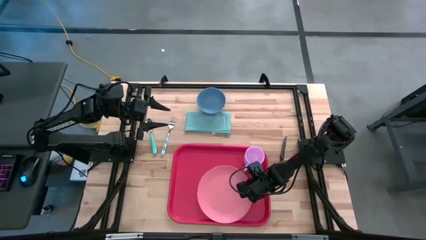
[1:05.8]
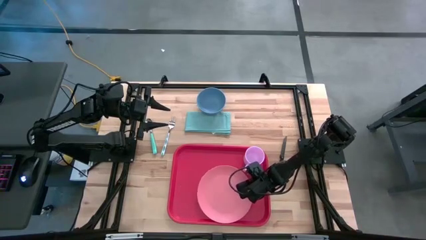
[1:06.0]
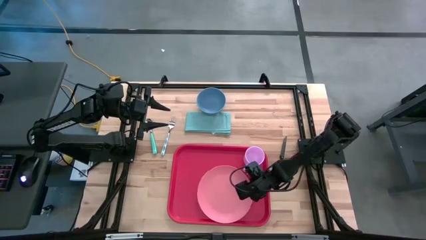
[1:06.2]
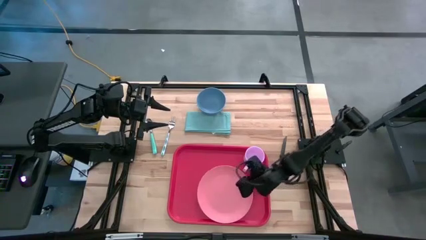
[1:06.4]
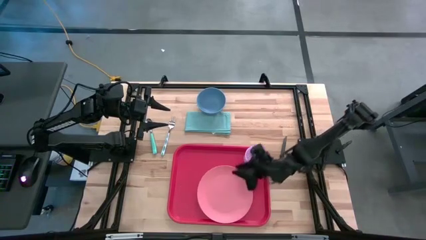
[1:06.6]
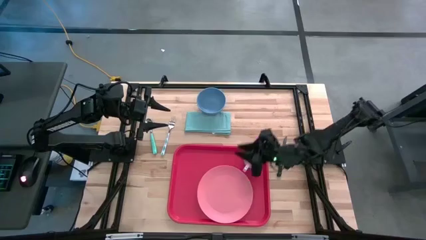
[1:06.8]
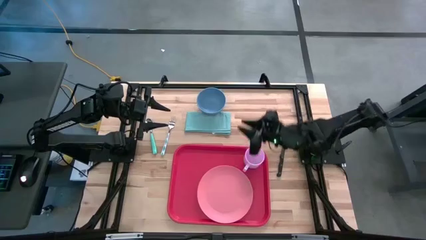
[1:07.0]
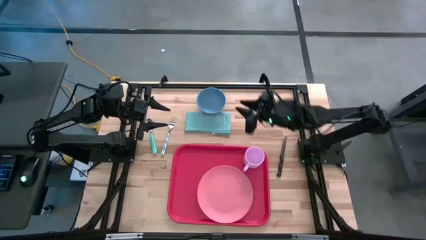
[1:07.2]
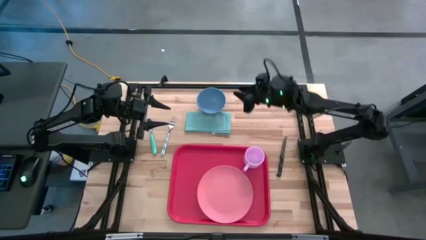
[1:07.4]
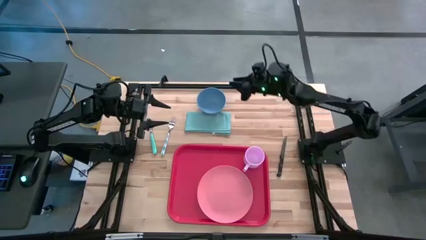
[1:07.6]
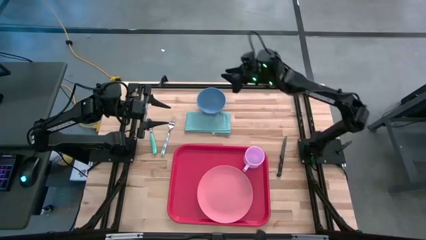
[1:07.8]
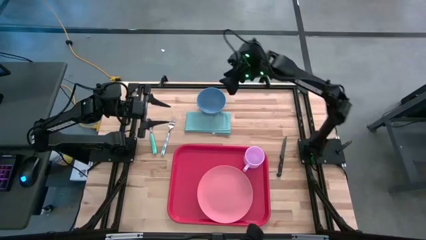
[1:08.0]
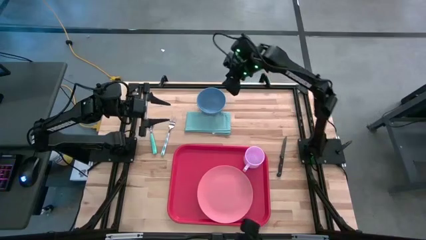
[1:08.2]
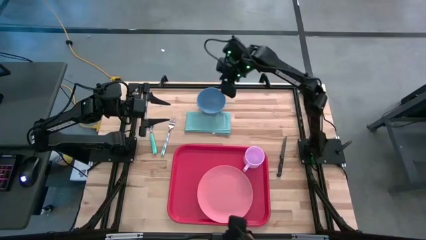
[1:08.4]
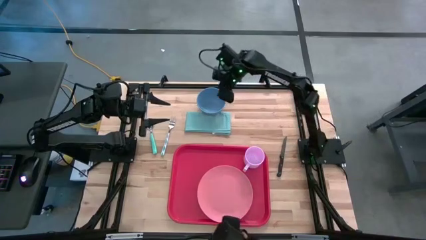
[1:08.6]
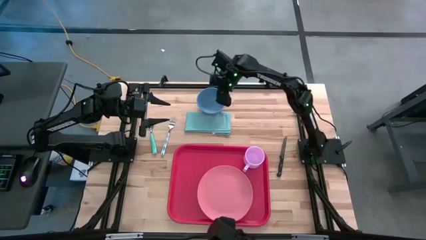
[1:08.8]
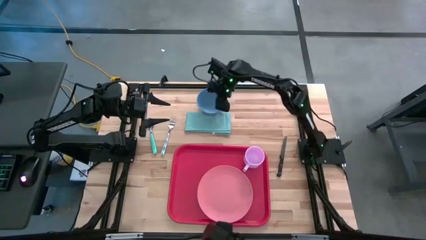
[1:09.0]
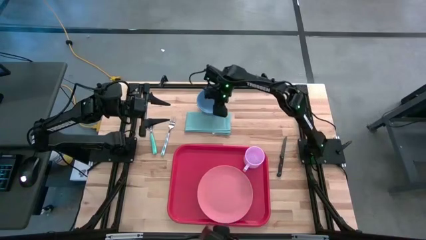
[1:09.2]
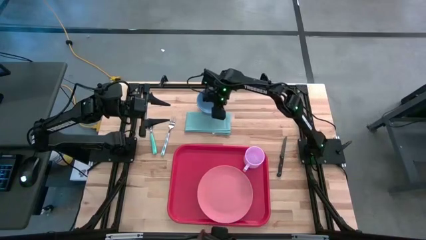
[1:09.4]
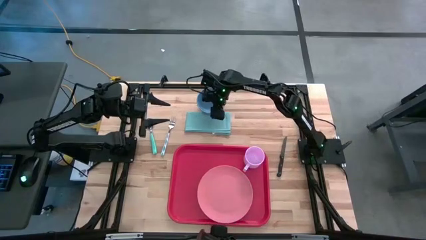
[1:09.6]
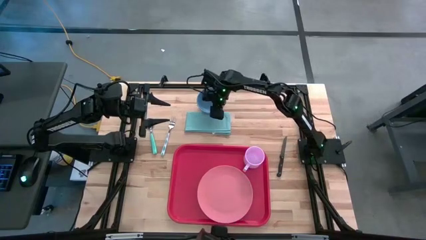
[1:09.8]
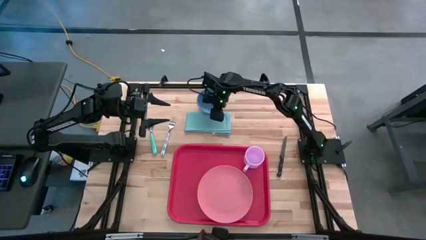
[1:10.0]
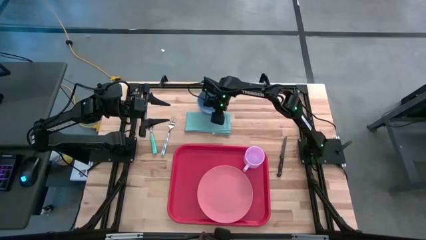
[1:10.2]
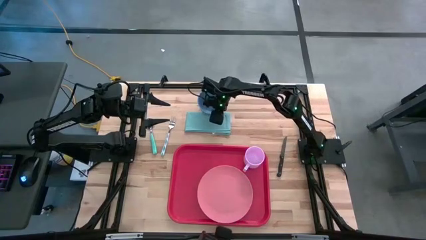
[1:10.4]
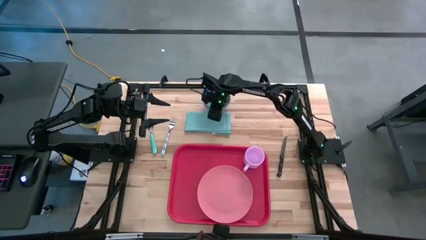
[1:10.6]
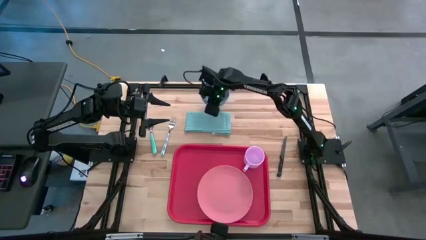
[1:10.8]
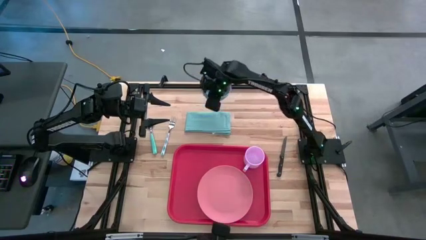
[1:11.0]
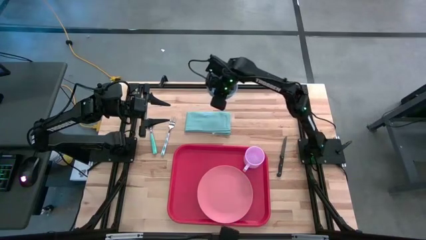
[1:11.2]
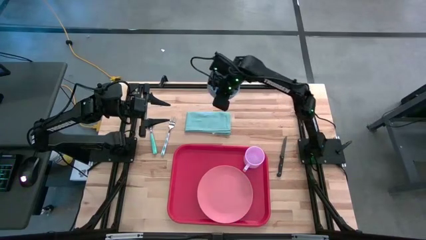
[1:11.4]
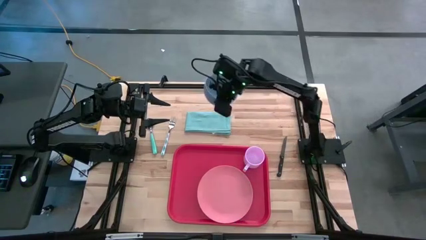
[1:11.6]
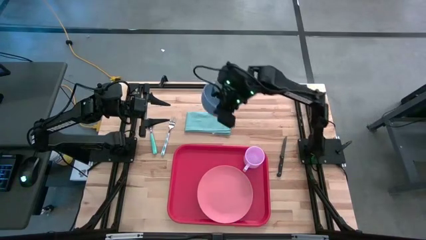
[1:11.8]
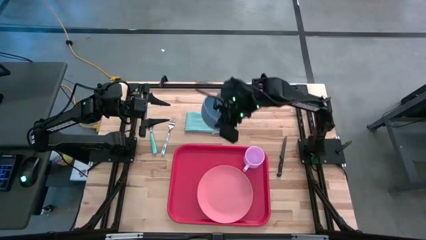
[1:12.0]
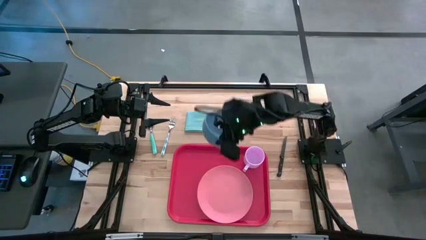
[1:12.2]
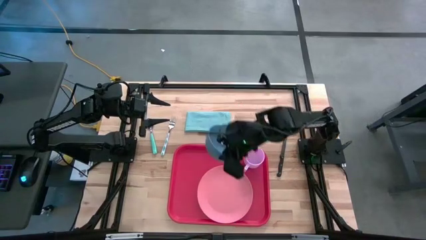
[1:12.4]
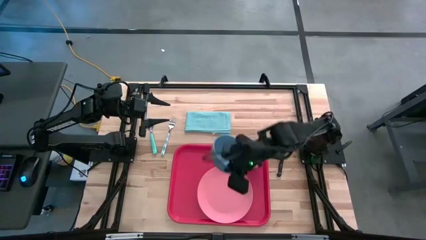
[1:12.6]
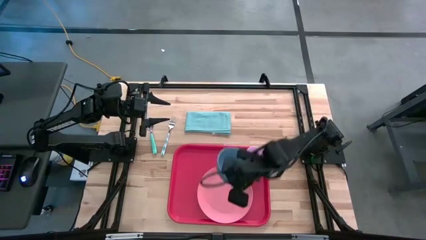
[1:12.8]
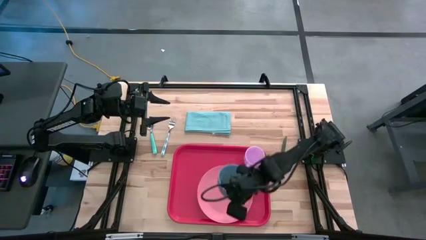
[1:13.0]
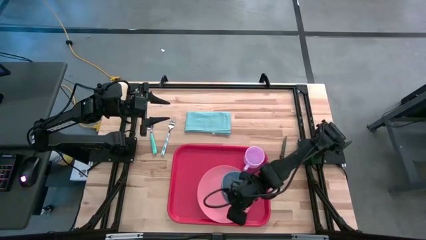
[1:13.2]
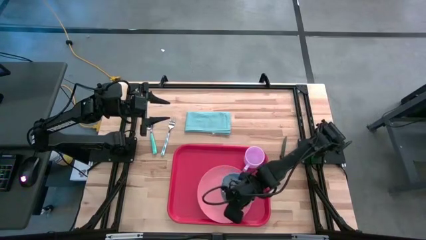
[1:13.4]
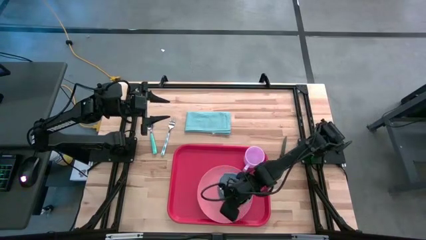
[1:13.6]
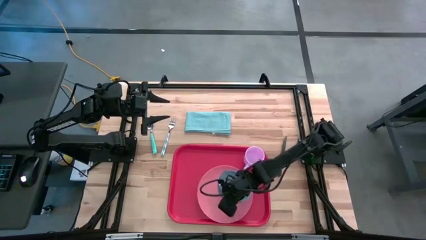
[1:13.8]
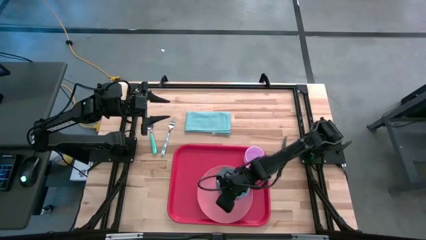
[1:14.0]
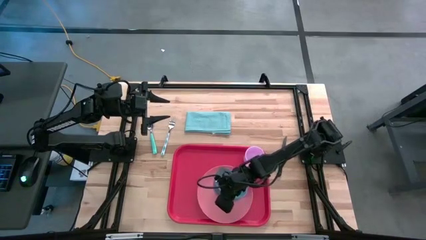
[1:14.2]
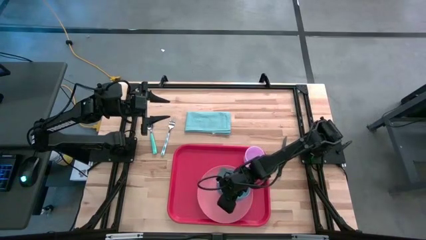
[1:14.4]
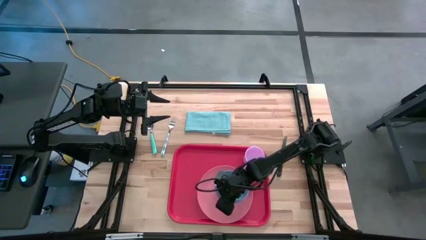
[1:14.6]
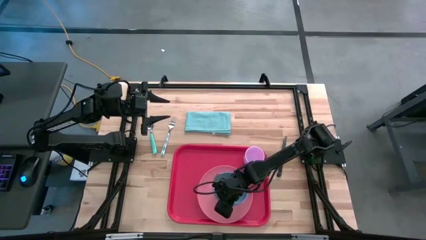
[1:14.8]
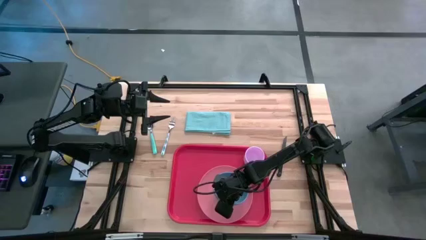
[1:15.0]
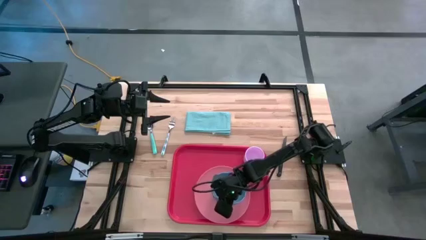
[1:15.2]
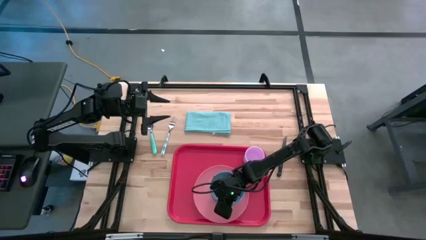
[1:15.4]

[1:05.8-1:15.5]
Task: Set up tray
Put the blue bowl on top of the pink plate

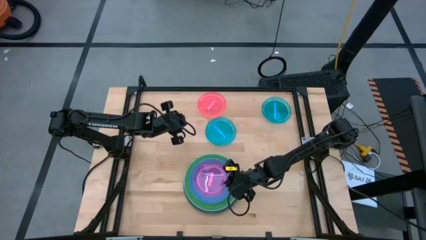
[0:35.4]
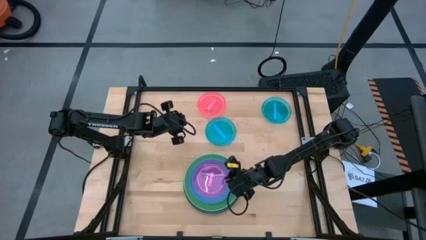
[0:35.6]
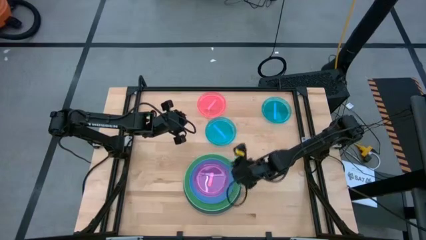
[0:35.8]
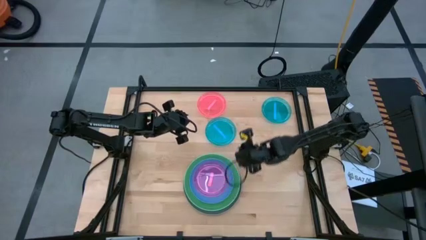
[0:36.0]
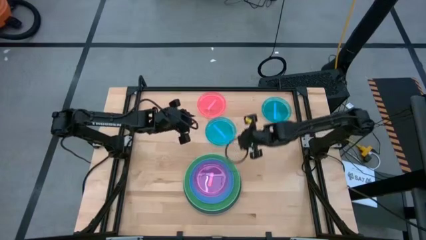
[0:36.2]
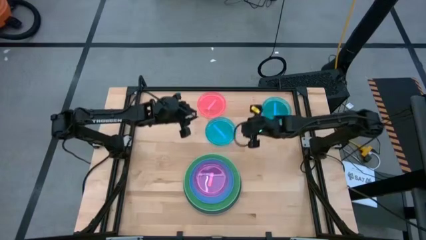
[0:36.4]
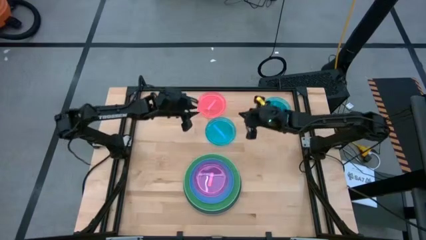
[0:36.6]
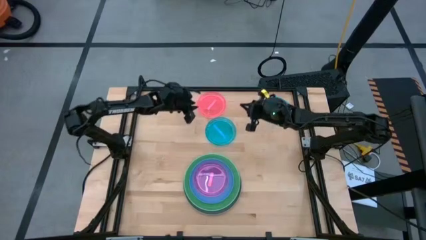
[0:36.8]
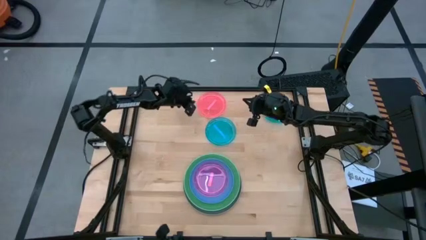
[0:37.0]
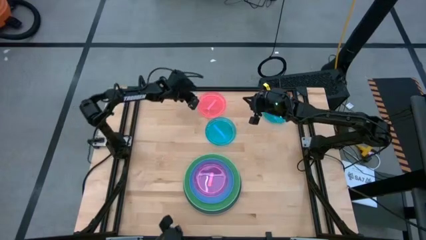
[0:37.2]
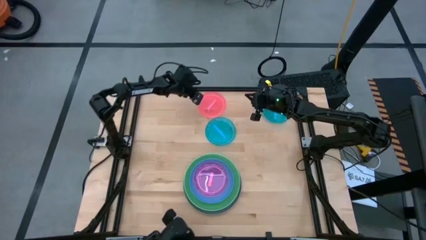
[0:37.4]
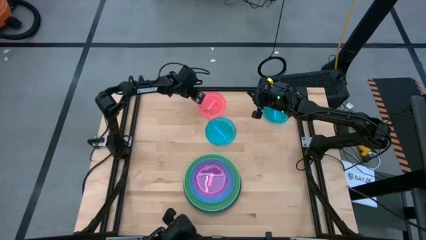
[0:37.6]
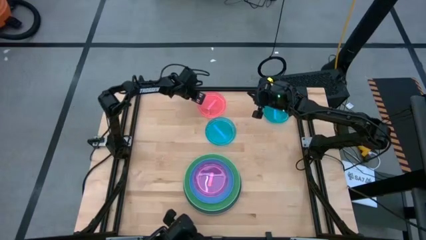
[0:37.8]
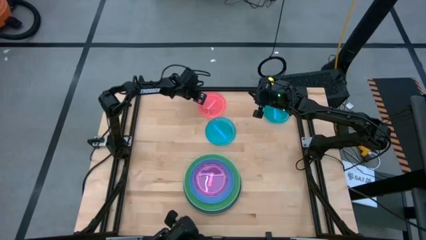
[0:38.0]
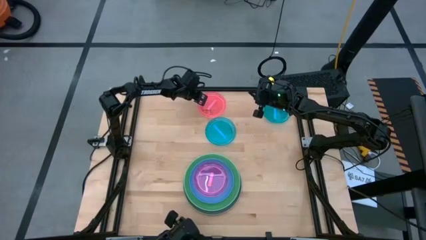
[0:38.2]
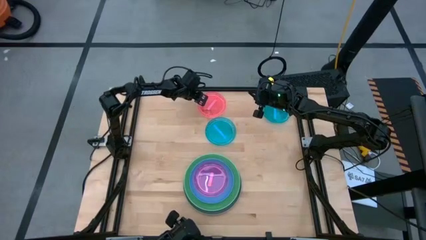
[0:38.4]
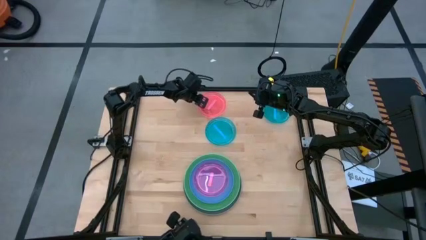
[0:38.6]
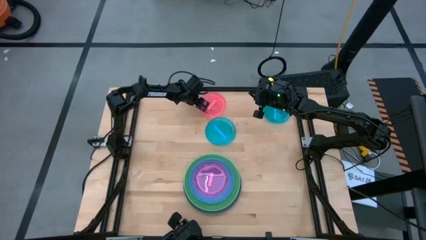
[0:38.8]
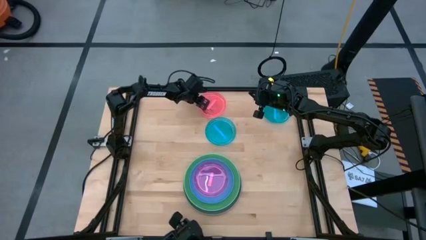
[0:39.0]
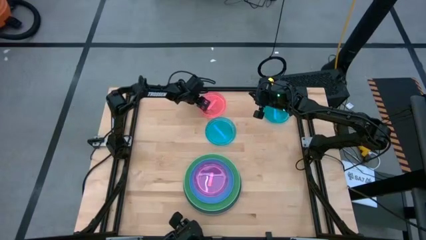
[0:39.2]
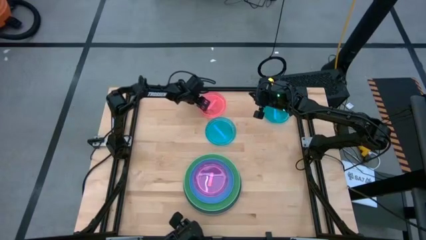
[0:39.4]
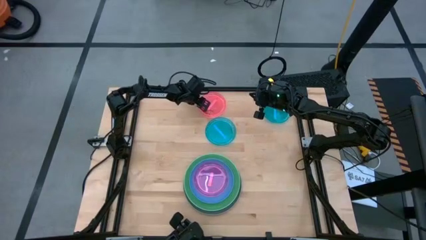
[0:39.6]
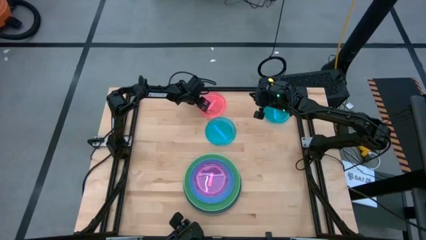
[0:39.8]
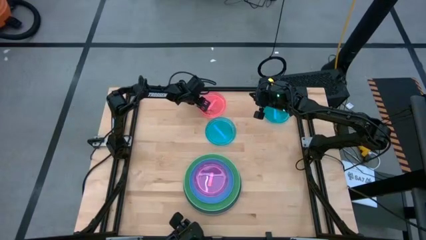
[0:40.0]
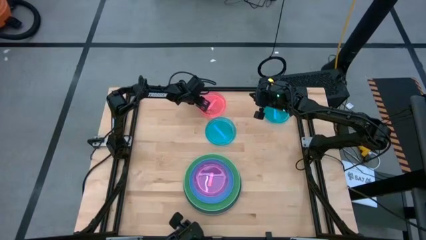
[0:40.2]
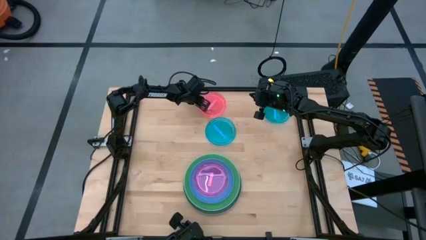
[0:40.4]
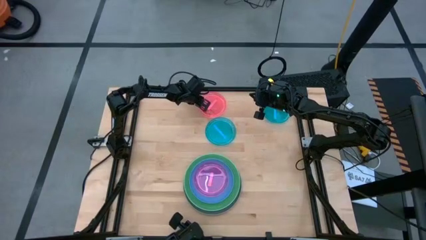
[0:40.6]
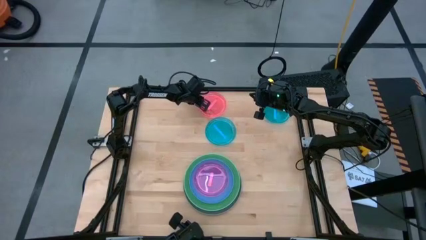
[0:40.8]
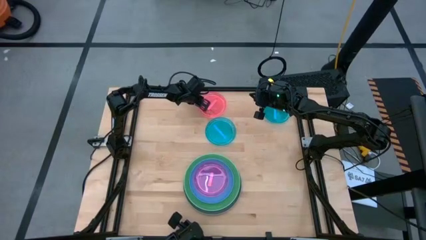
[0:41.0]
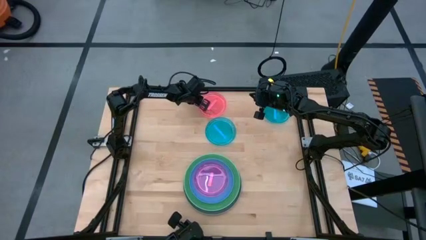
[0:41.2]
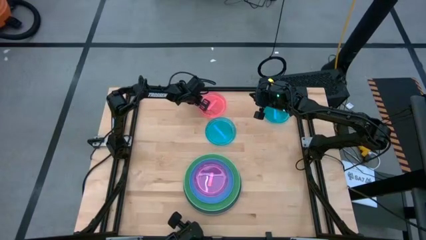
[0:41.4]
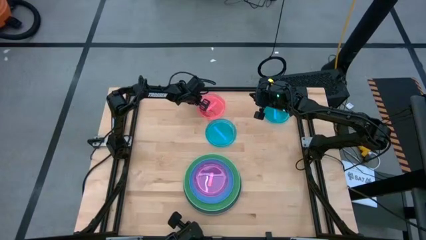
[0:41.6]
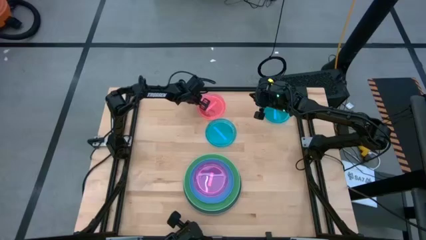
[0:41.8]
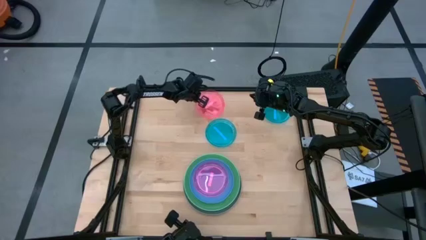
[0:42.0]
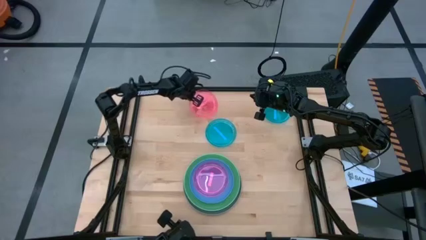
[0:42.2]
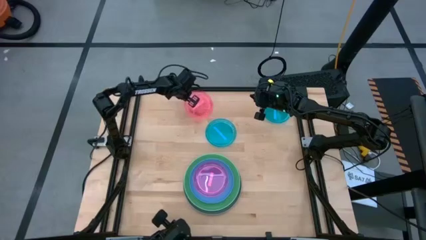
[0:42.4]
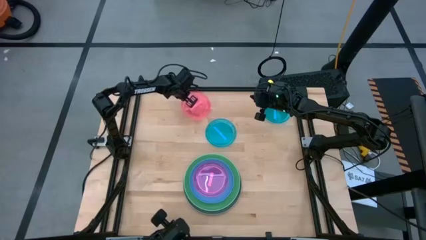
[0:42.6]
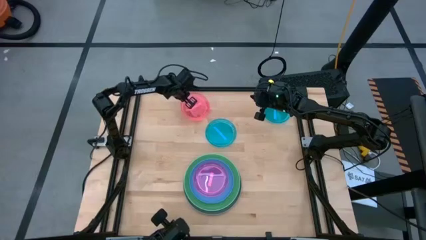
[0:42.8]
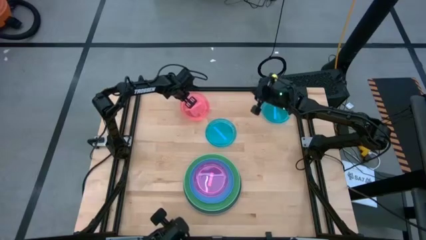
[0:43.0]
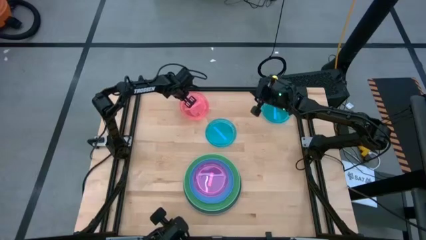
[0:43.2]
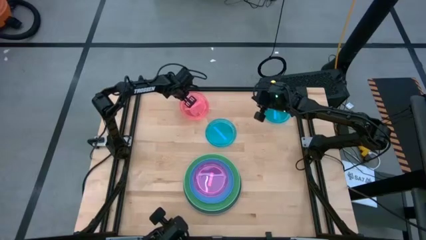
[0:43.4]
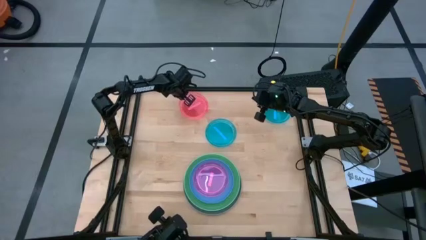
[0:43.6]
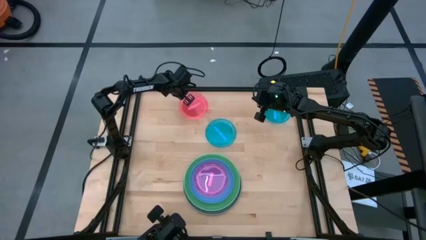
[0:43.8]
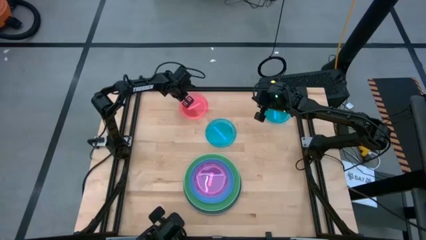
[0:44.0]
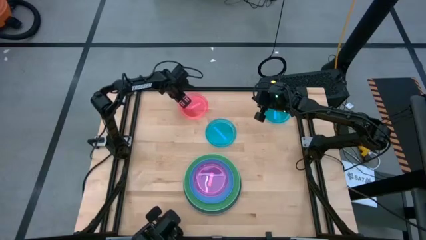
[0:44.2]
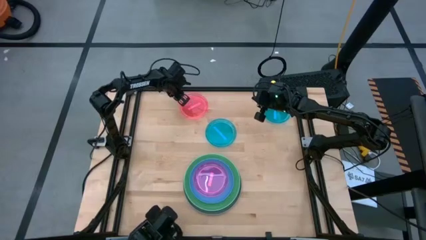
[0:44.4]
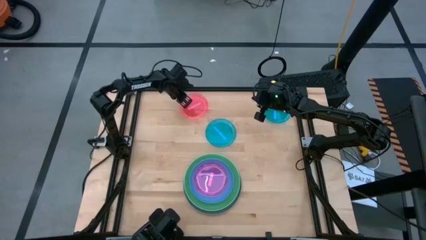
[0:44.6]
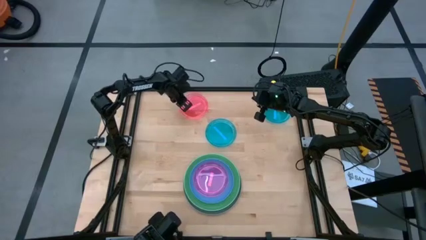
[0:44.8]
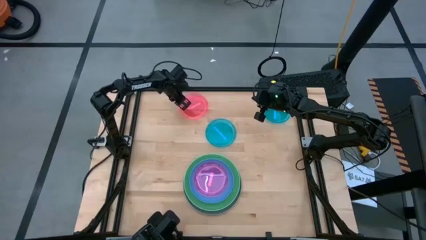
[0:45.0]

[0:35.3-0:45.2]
Task: Stack plastic plates
Stack the small pink plate on top of the bottom small pink plate
